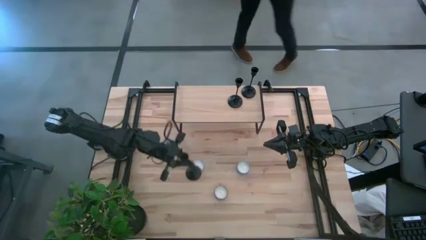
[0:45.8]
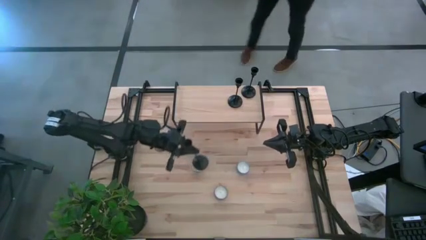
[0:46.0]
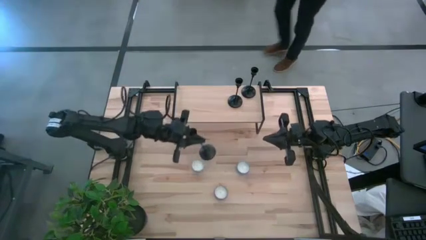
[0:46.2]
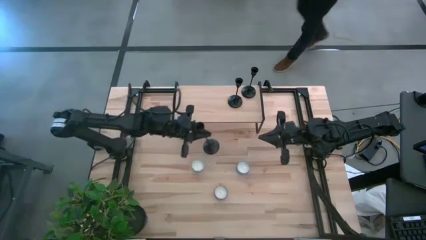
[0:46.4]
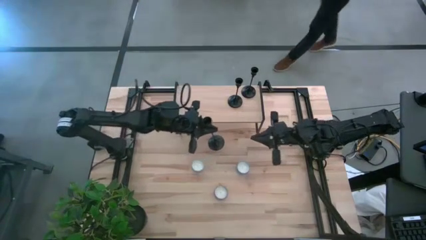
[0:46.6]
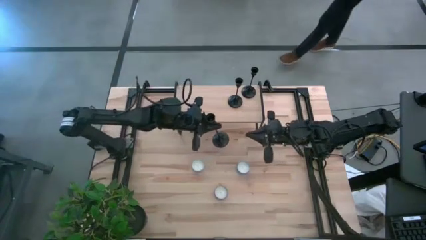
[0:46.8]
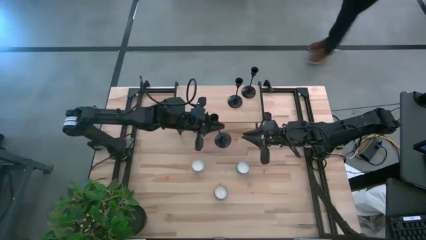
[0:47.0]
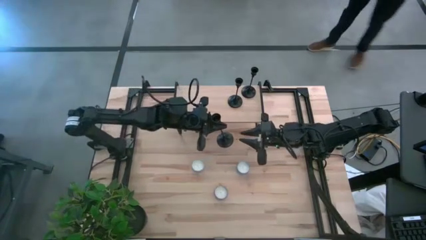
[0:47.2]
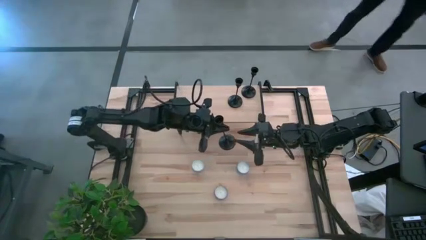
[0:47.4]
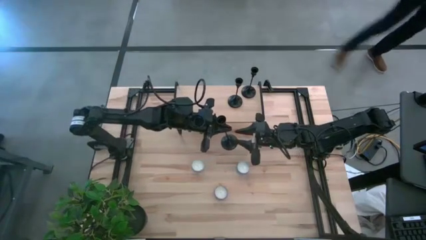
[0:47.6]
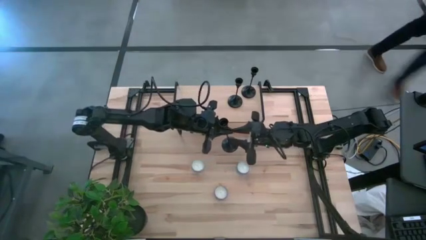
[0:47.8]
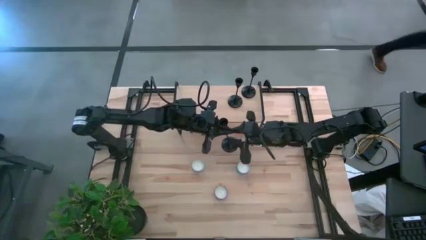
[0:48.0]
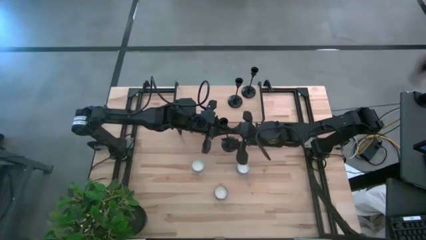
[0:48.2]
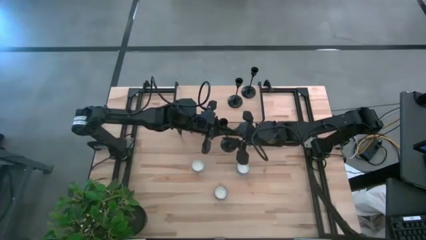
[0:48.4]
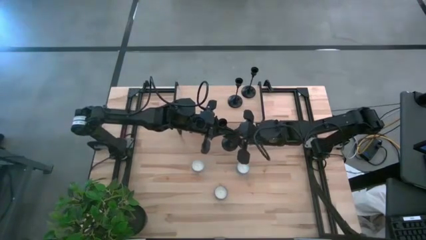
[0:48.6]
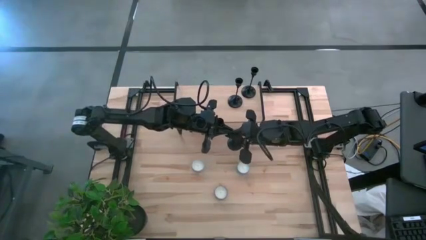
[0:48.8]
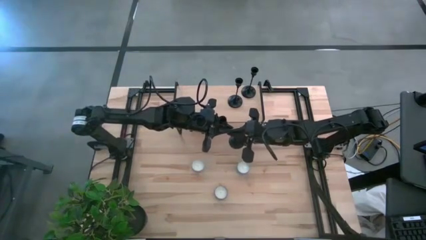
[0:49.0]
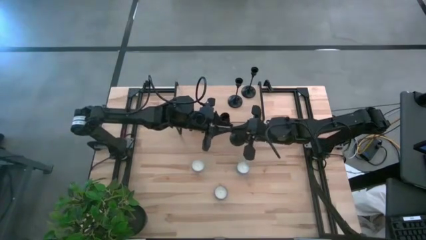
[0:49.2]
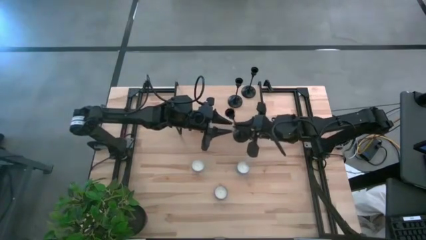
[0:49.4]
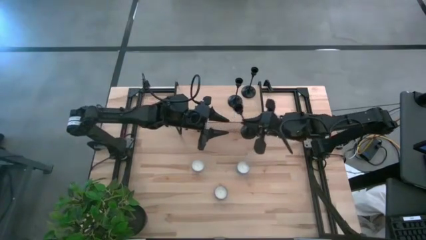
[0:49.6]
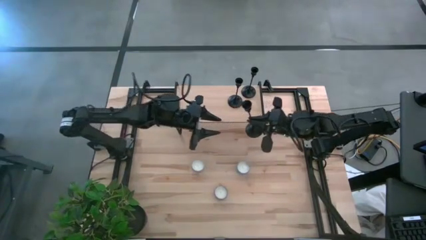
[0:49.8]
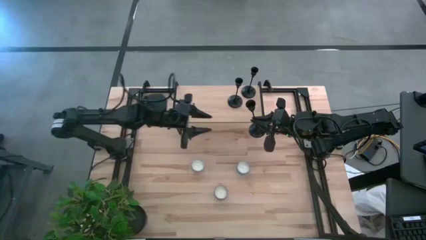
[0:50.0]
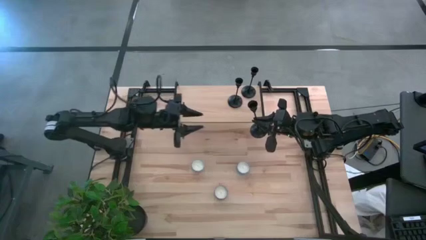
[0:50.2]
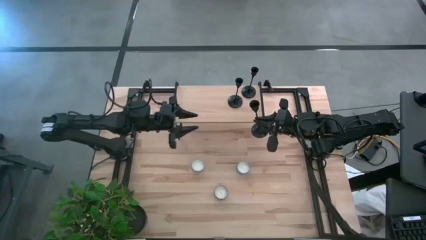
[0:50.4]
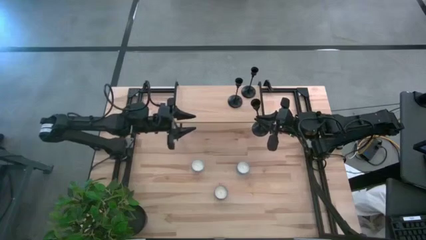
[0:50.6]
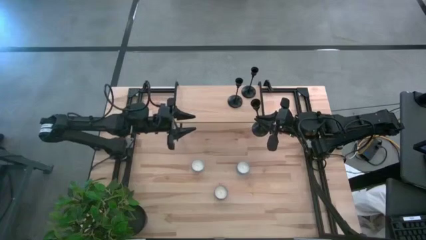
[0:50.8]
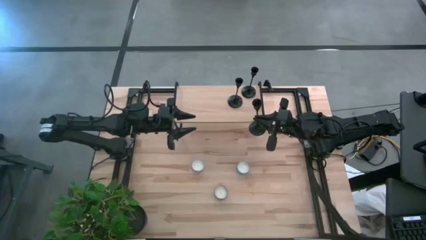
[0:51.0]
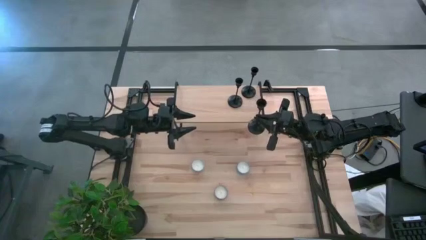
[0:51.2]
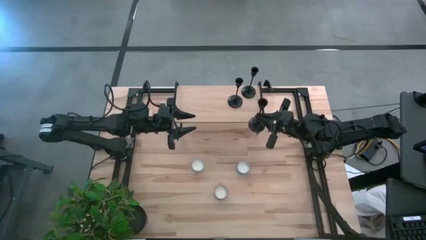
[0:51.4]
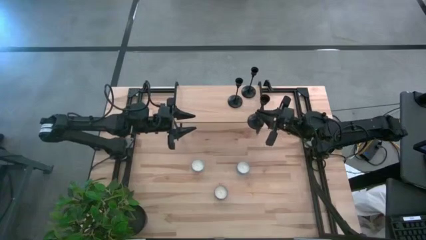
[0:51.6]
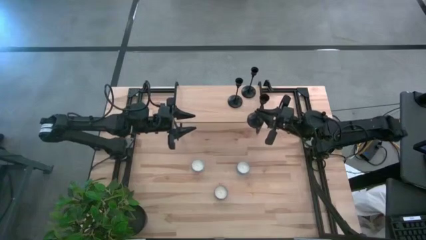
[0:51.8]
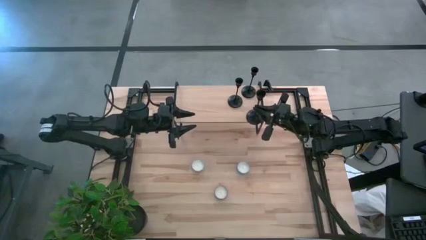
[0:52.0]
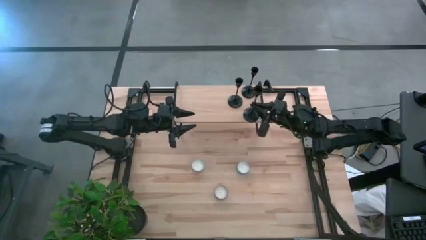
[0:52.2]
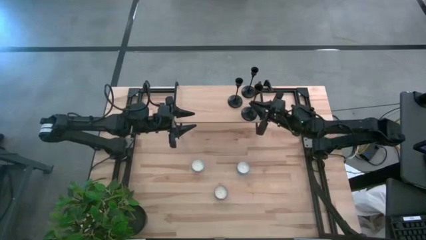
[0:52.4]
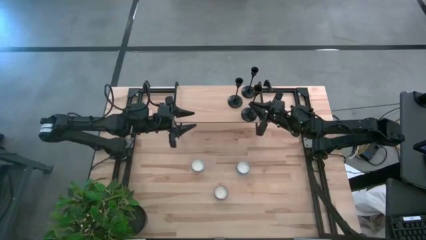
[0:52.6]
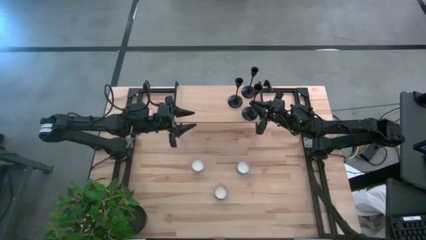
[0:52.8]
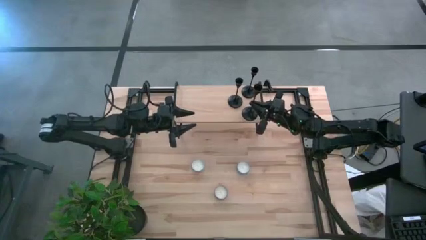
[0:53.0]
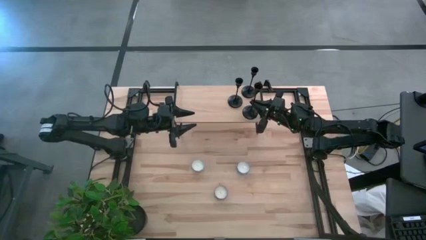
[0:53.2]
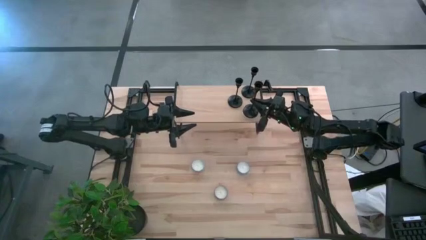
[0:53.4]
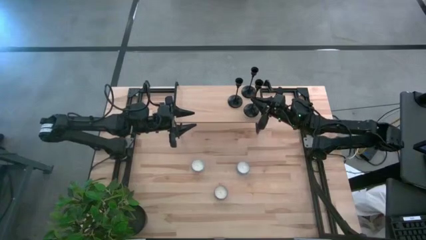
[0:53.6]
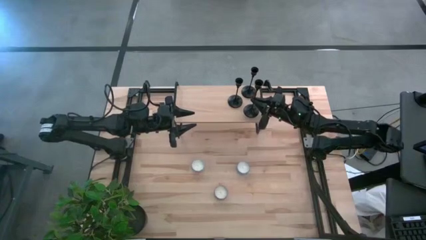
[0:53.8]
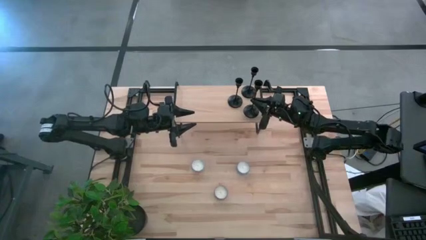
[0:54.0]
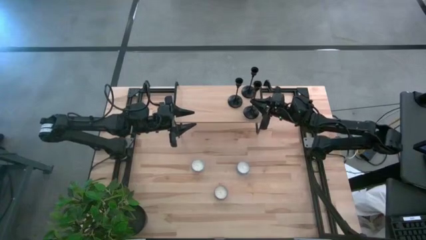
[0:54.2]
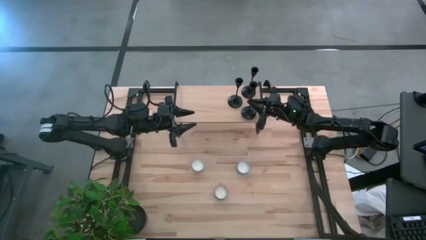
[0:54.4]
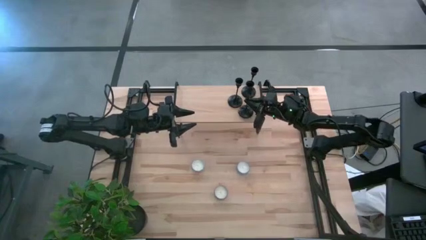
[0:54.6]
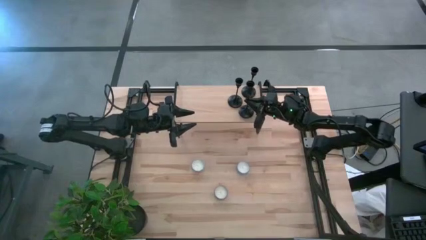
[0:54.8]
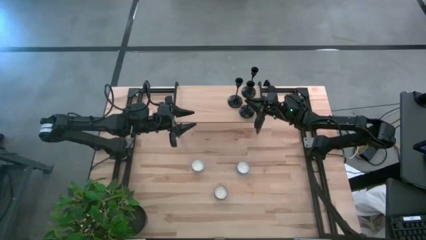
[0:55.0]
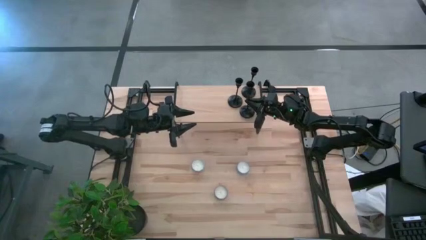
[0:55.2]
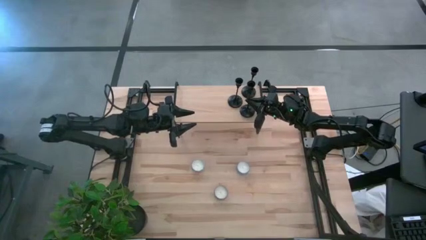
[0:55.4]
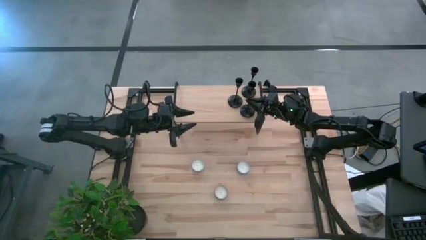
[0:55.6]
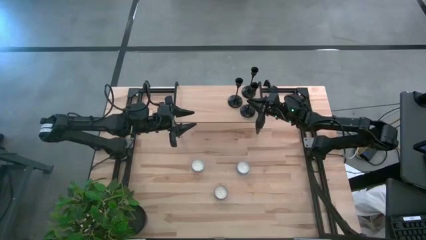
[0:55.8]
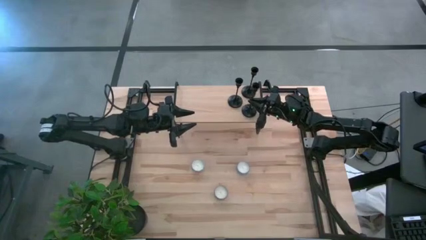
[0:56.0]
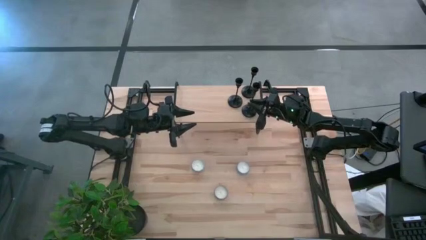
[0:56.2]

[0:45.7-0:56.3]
Task: Pick & Place candle stick holders
Put the black candle holder on the shelf
